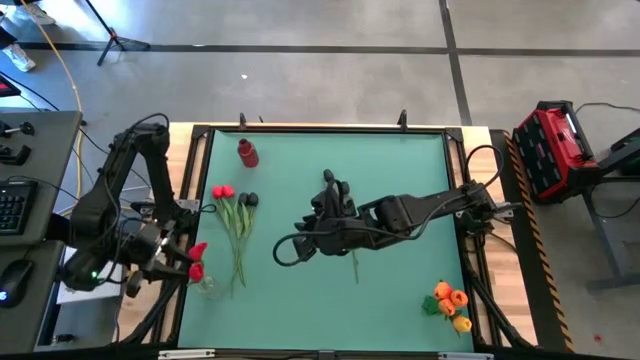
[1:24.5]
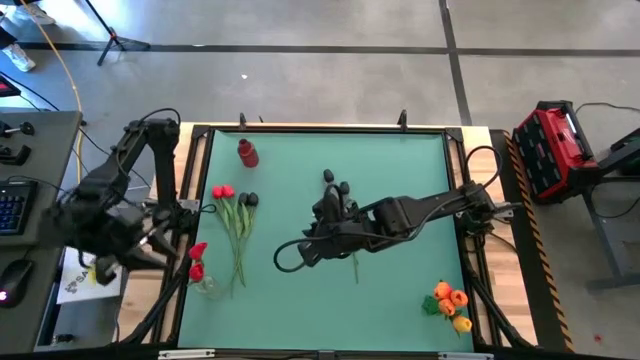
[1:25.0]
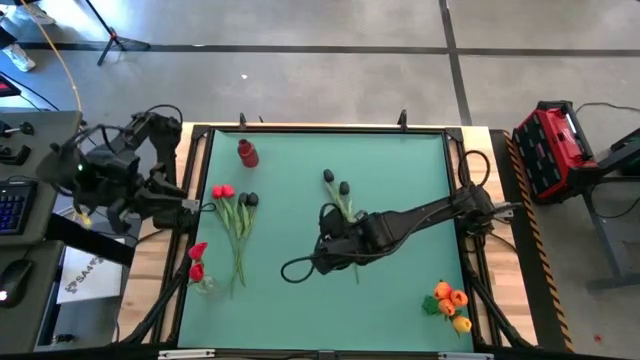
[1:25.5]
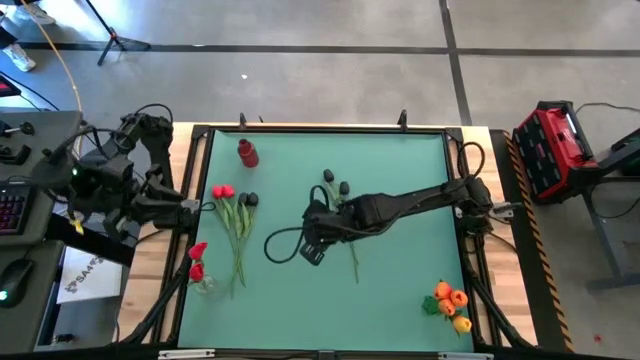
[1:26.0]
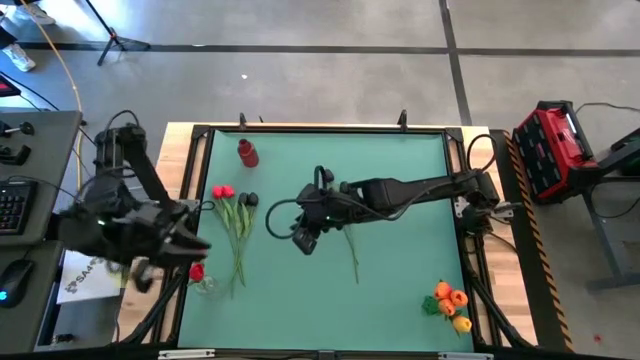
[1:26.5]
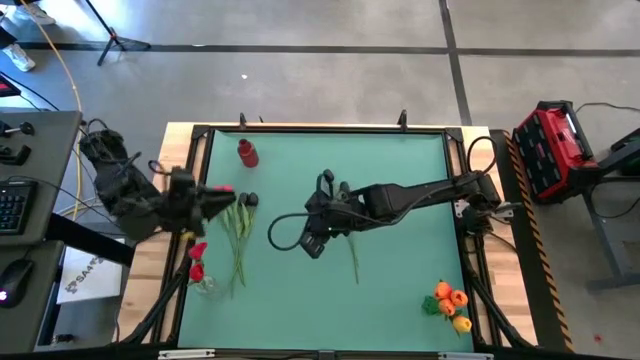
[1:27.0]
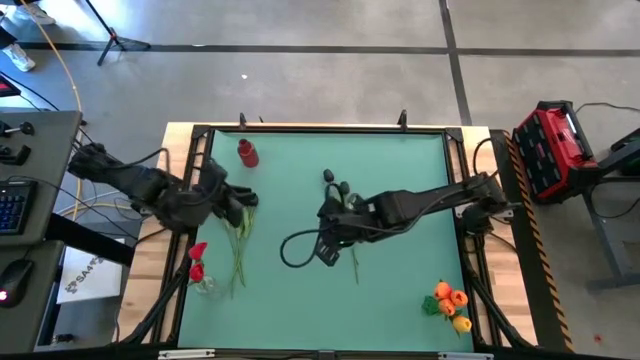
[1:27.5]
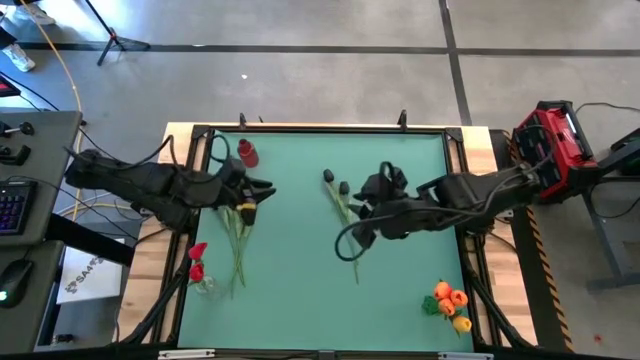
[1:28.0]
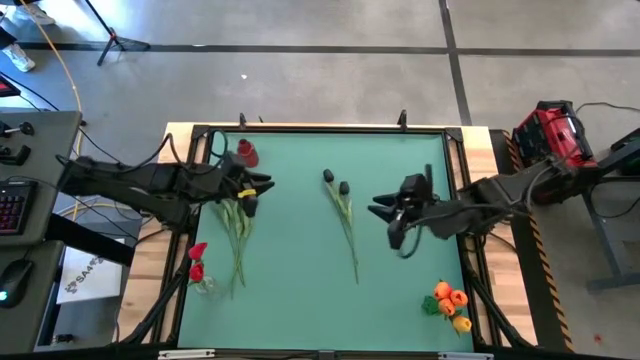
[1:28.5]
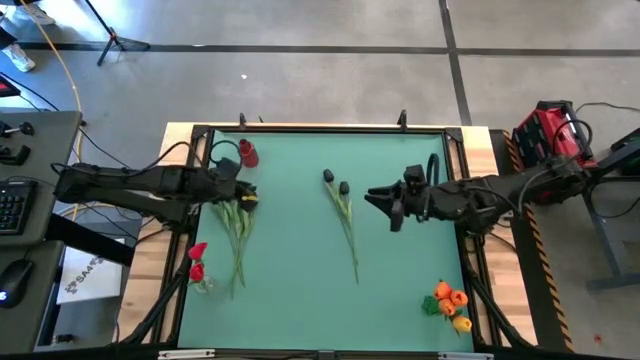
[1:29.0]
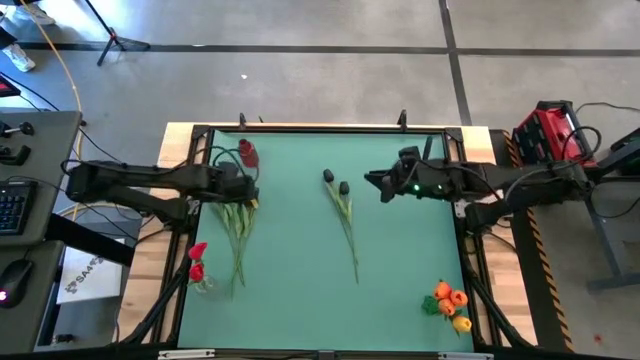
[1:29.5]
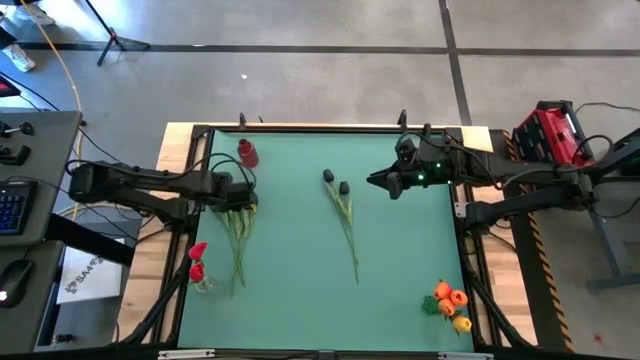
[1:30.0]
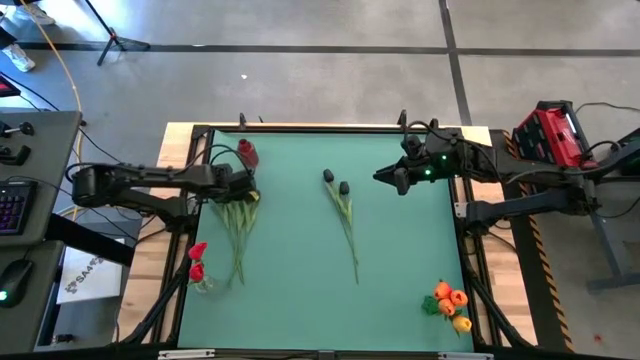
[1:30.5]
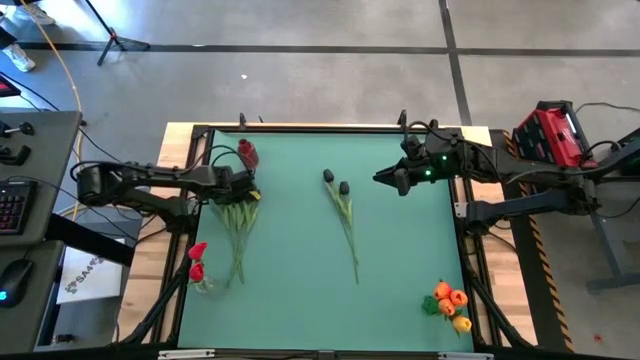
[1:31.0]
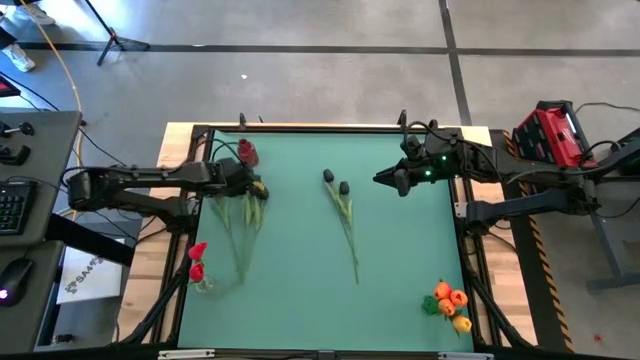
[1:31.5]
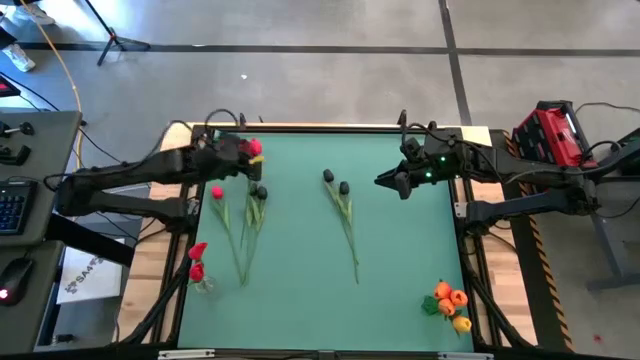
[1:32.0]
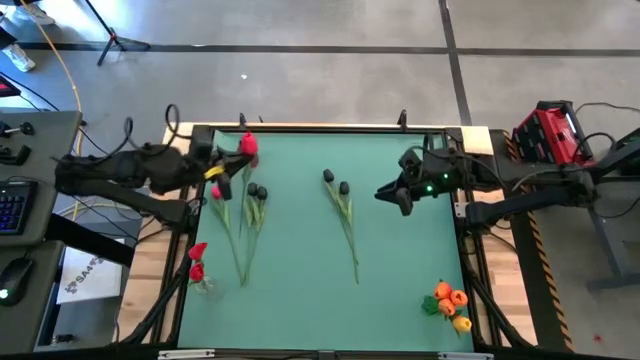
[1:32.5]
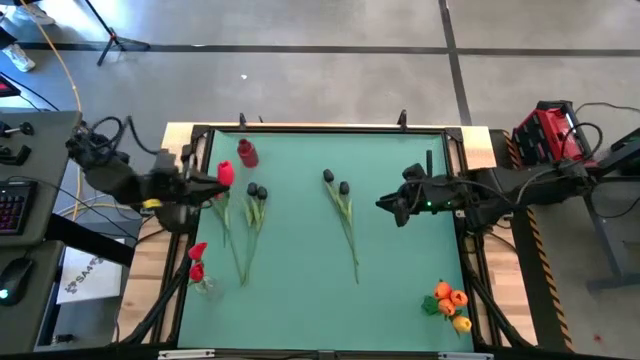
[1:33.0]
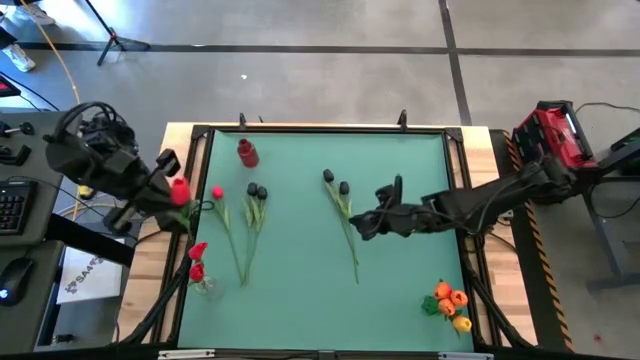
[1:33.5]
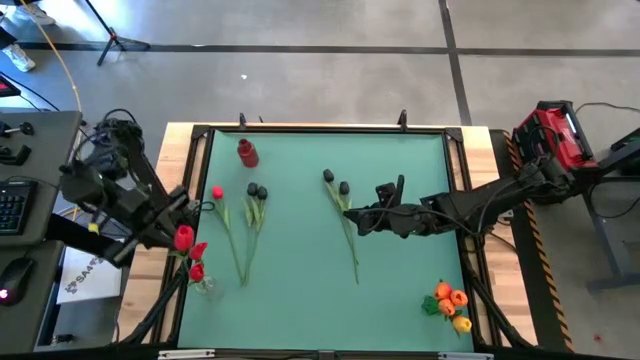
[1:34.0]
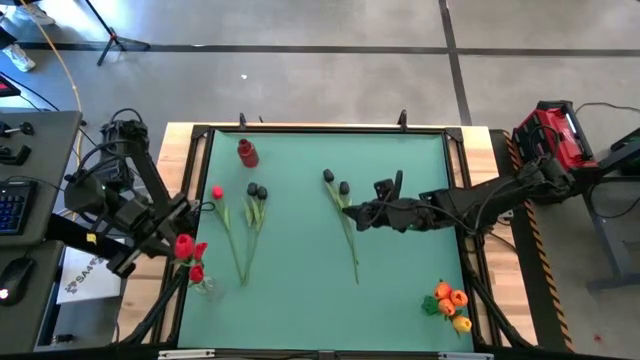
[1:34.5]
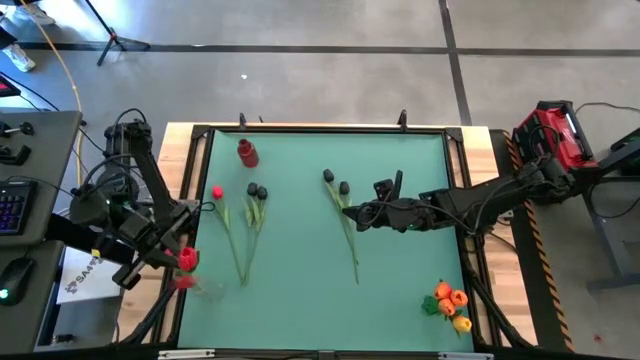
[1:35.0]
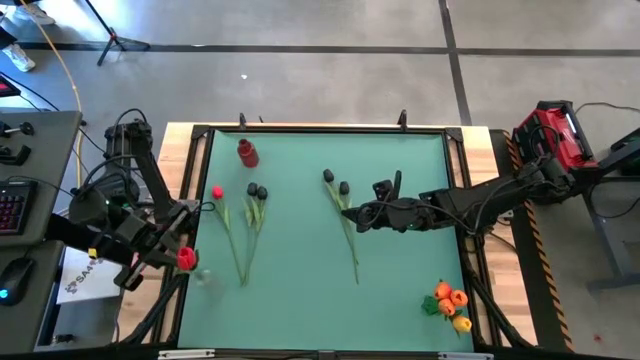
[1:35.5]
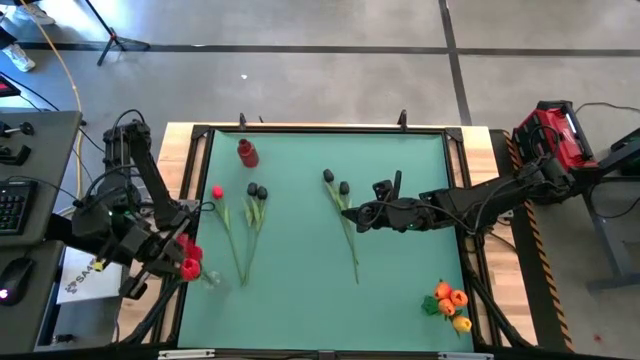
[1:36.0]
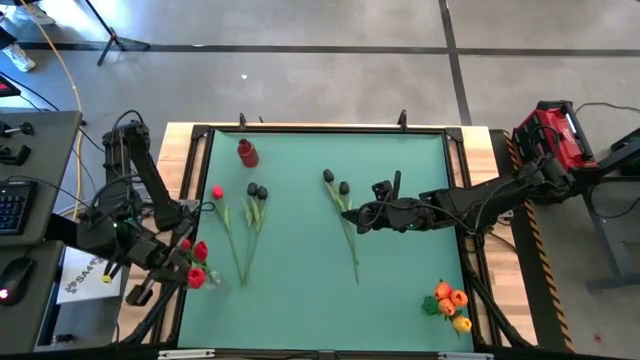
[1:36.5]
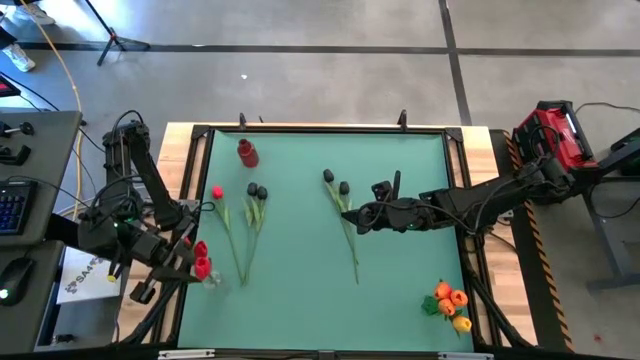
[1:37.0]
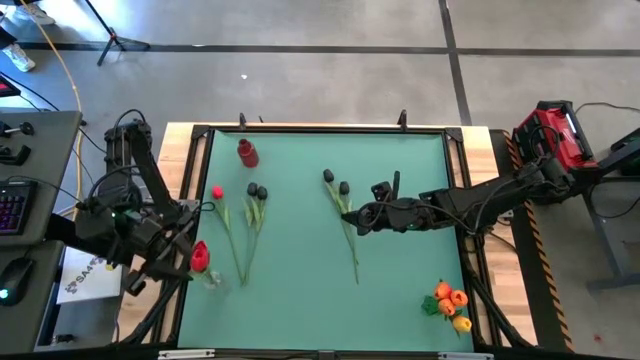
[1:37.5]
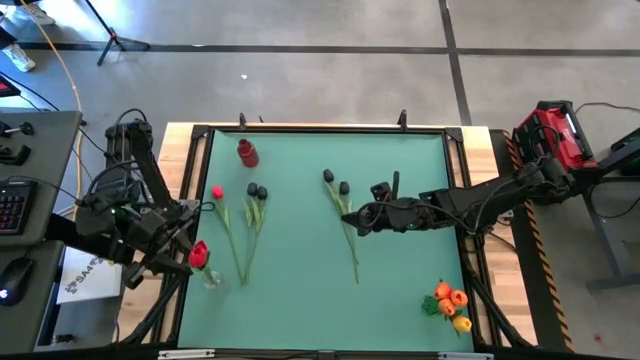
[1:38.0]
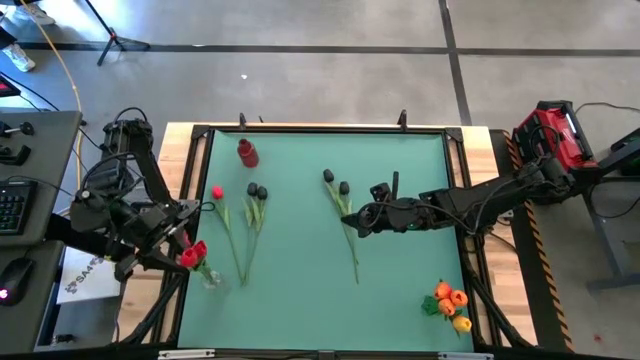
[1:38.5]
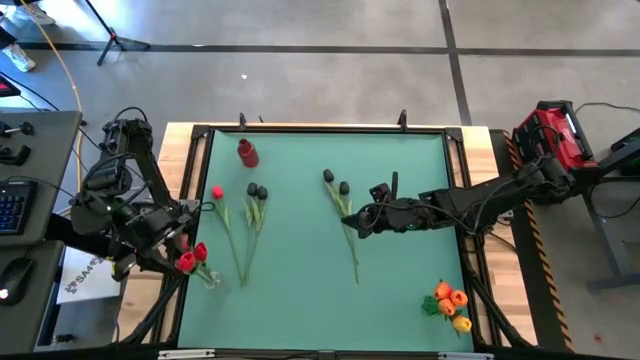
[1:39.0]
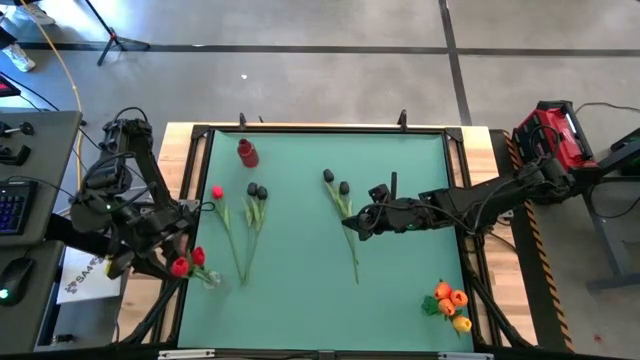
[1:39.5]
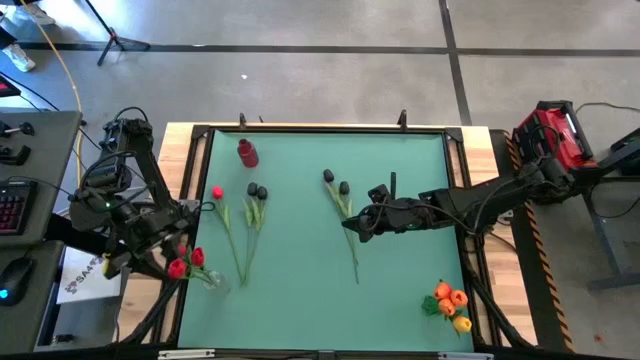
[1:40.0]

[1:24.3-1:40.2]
Task: Sort flowers into vase by color
Put the red flower into the transparent vase
